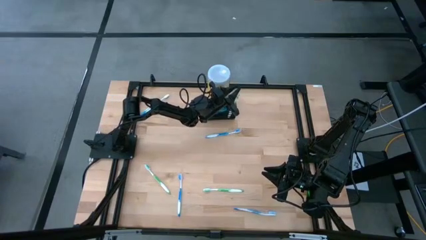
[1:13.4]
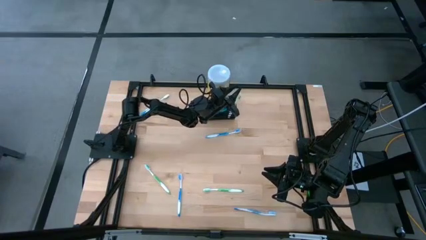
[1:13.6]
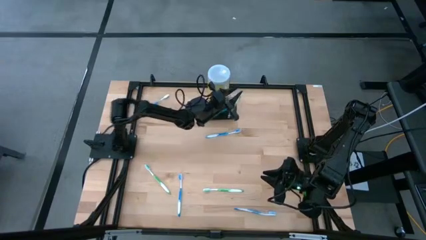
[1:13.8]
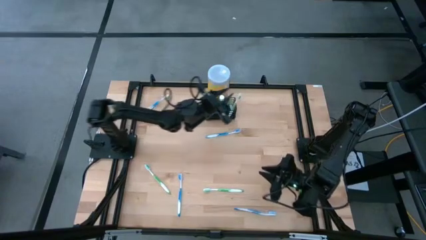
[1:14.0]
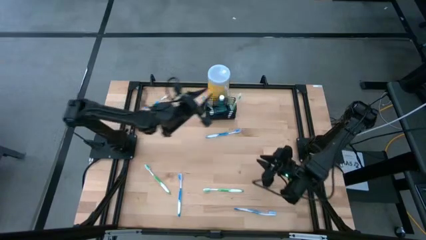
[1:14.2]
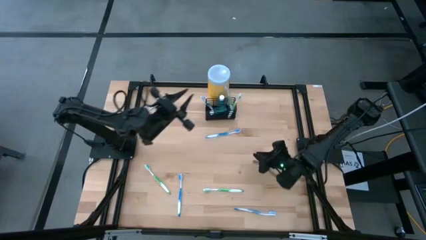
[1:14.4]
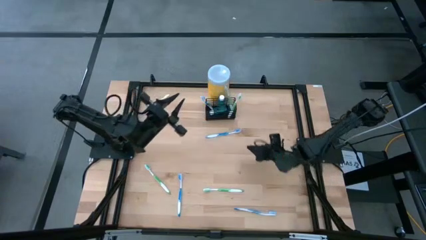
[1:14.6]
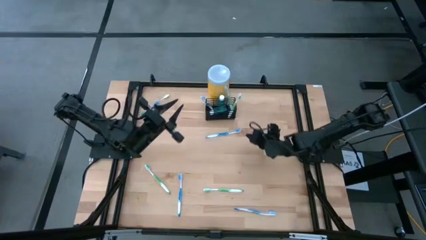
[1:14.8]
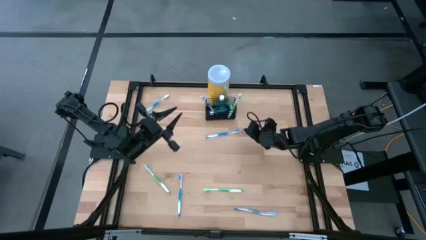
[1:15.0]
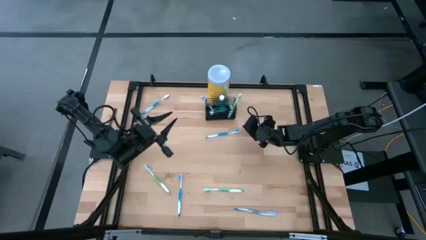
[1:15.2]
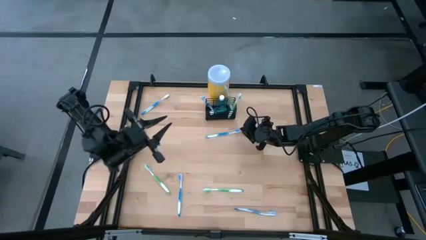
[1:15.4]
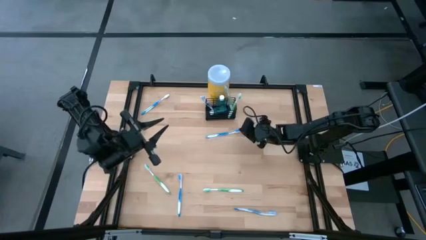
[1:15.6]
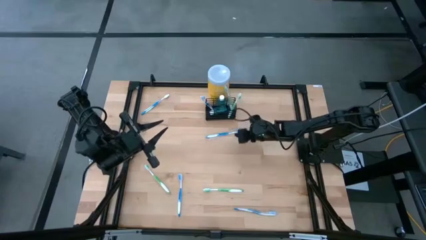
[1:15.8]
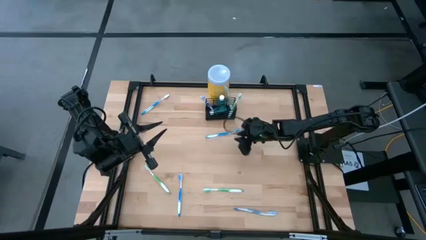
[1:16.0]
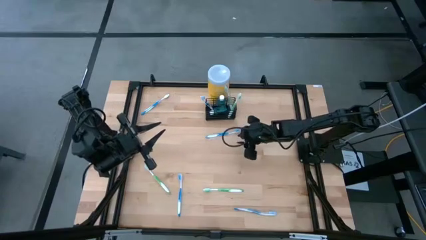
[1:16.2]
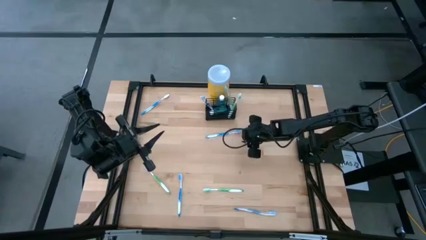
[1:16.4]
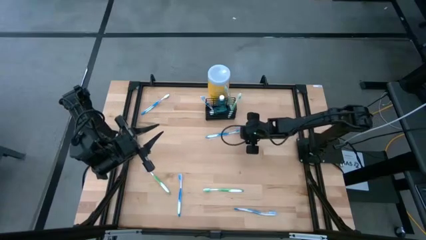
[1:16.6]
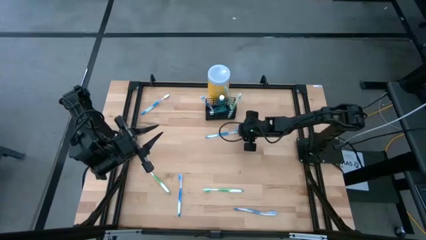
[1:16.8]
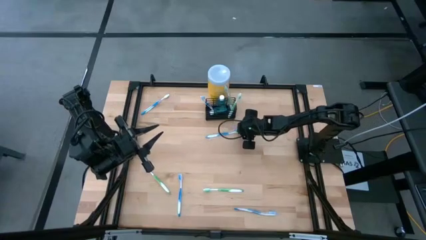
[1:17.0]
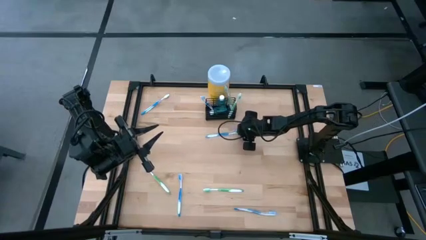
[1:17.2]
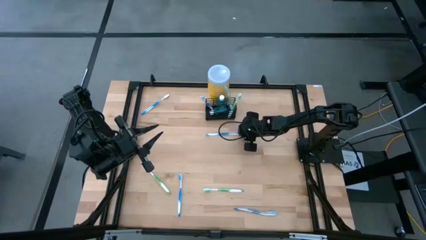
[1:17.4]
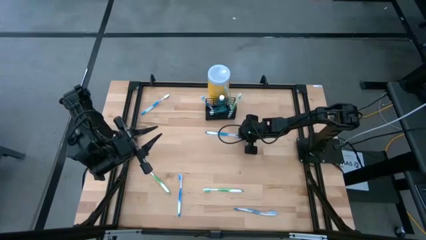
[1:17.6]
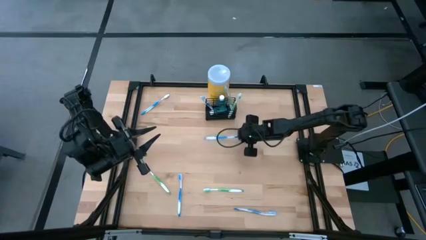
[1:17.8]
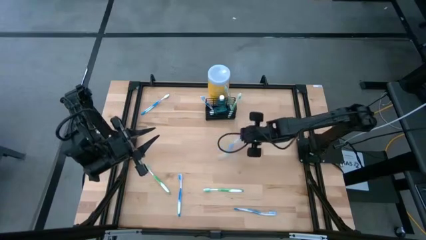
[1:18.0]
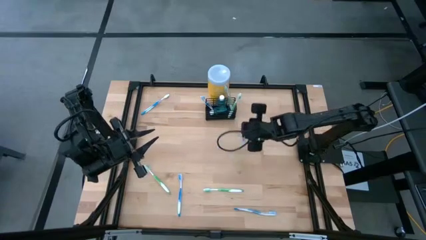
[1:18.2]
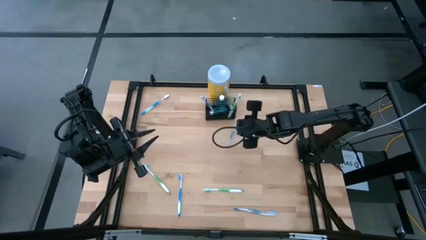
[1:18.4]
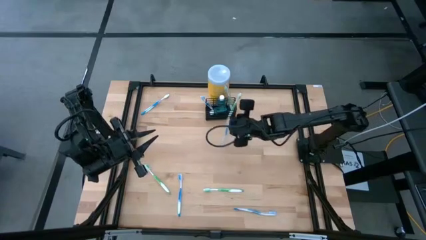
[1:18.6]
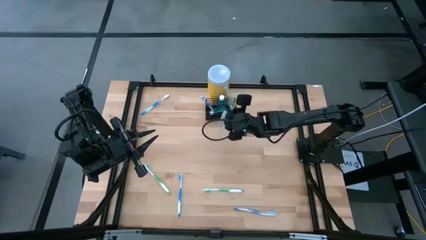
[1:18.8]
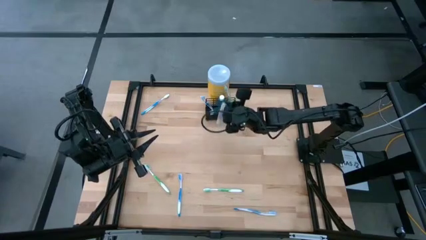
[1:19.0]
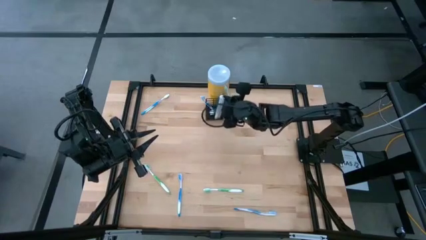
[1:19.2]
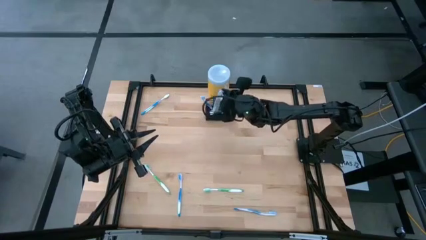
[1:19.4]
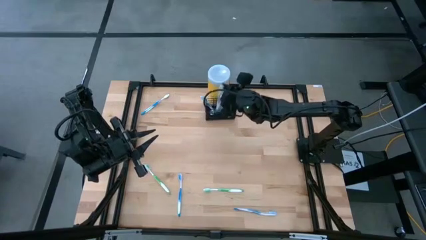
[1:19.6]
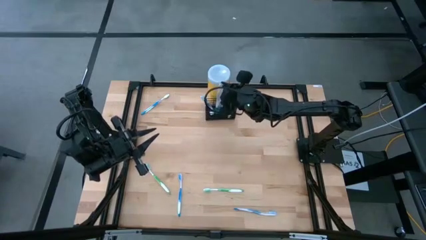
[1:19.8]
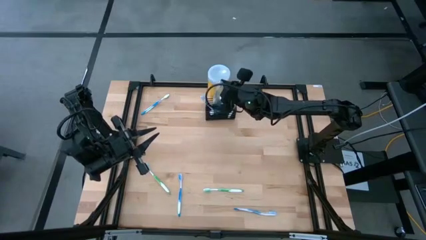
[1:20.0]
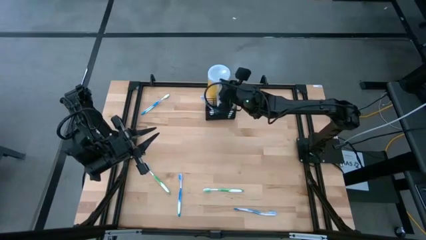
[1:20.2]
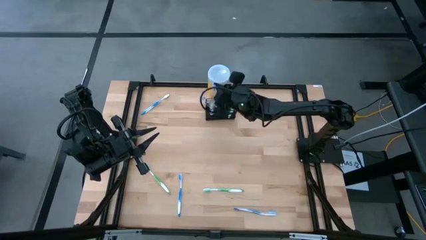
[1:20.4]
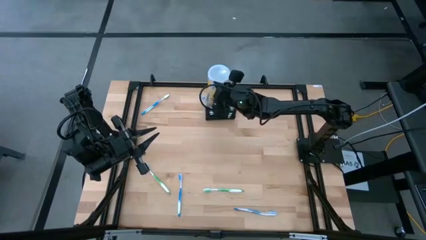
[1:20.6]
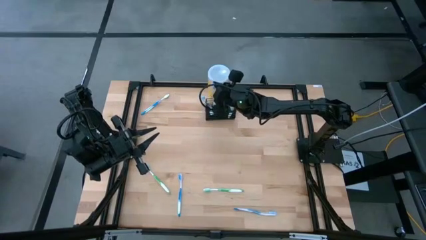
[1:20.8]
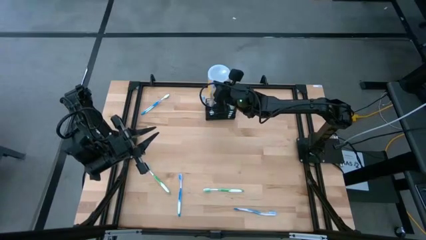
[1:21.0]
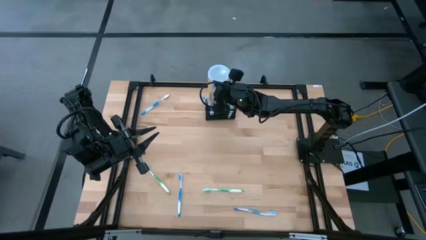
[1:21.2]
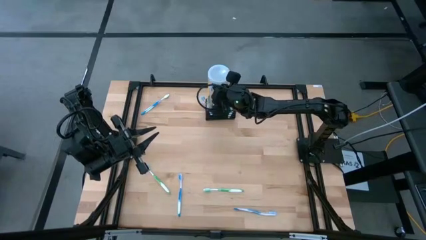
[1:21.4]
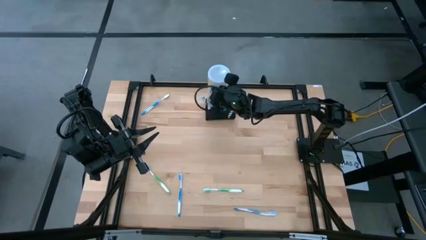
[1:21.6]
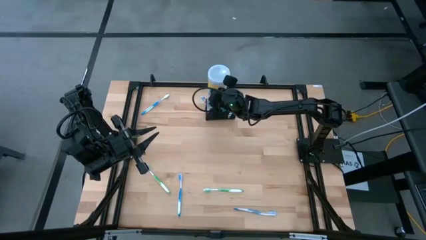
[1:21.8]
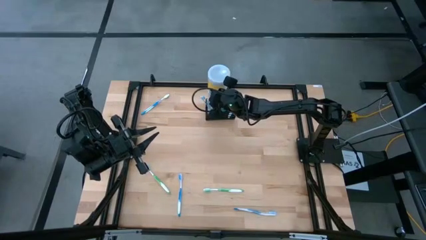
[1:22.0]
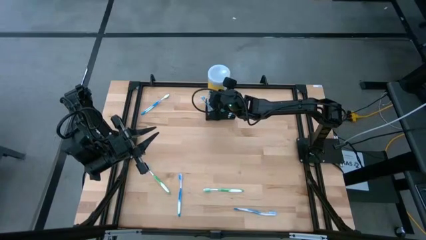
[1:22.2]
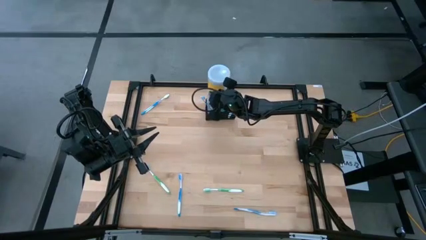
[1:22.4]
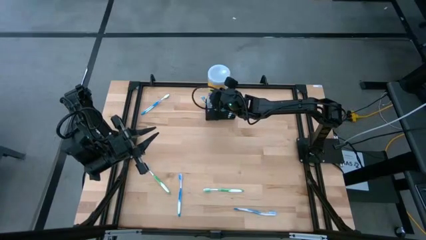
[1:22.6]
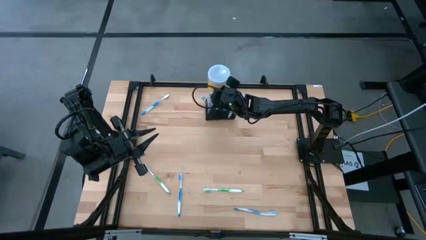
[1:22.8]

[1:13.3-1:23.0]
Task: Pick & Place toothbrushing station
Put the blue toothbrush in the wire organizer

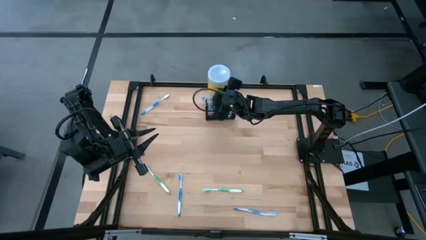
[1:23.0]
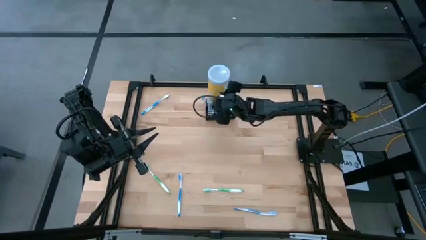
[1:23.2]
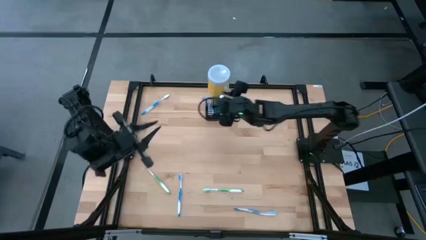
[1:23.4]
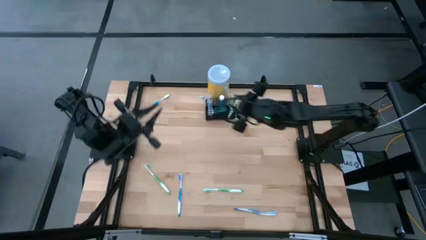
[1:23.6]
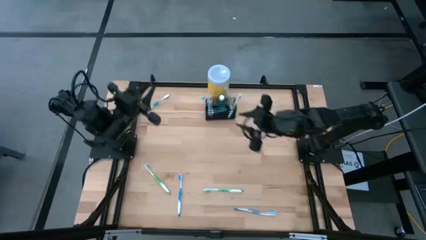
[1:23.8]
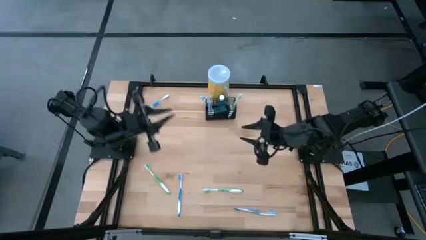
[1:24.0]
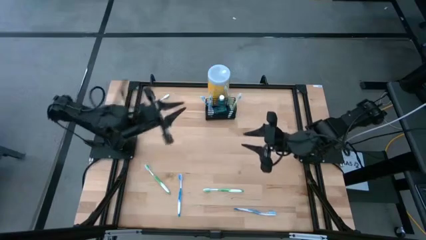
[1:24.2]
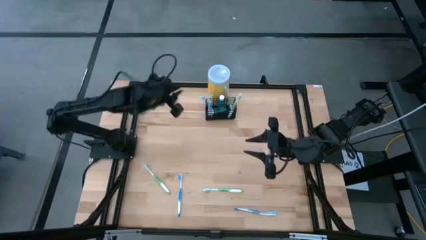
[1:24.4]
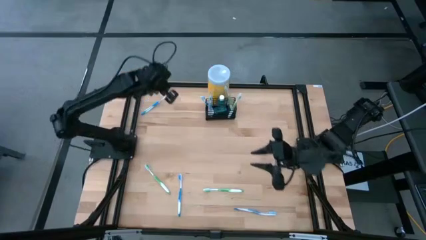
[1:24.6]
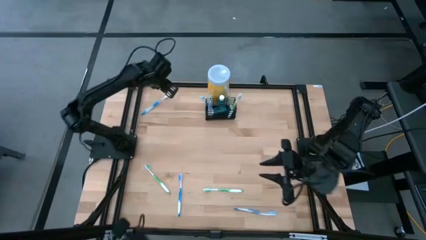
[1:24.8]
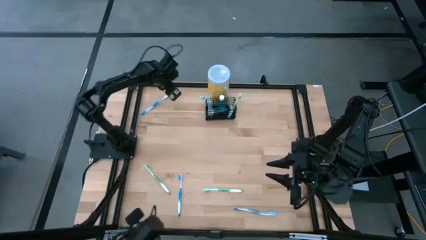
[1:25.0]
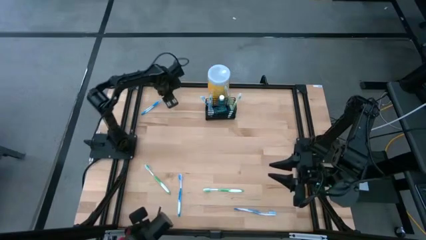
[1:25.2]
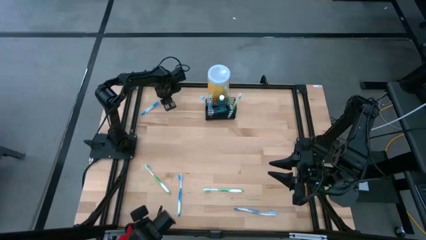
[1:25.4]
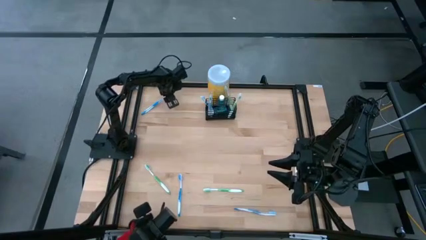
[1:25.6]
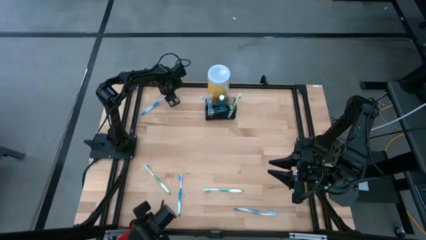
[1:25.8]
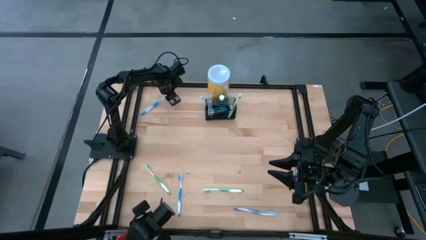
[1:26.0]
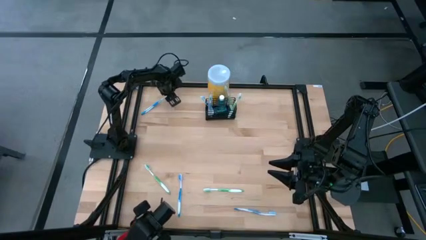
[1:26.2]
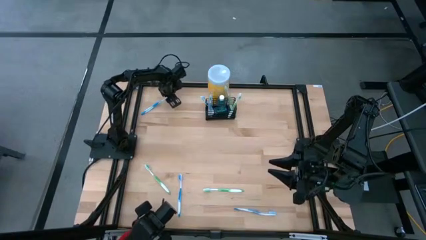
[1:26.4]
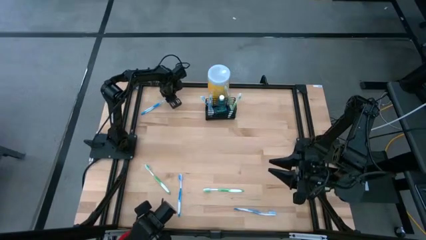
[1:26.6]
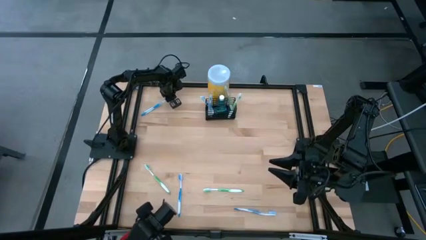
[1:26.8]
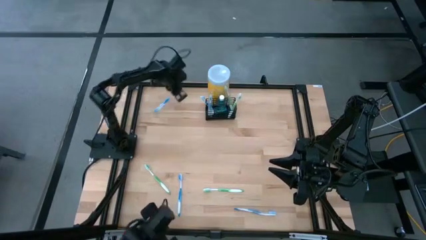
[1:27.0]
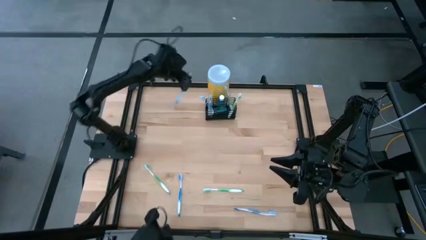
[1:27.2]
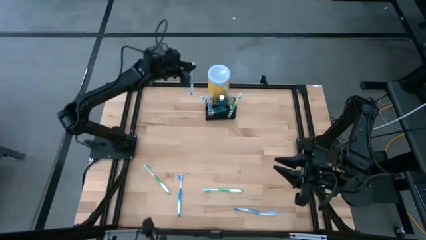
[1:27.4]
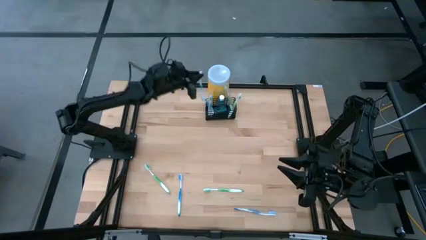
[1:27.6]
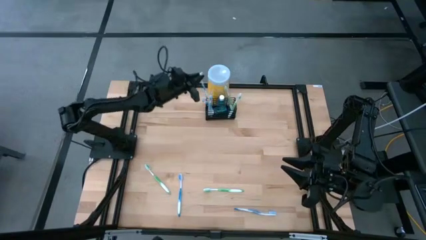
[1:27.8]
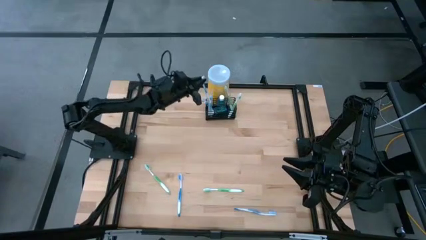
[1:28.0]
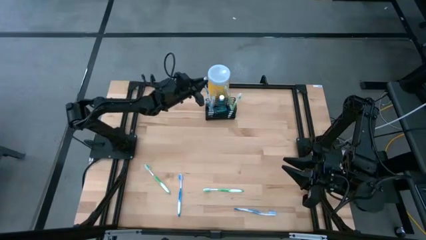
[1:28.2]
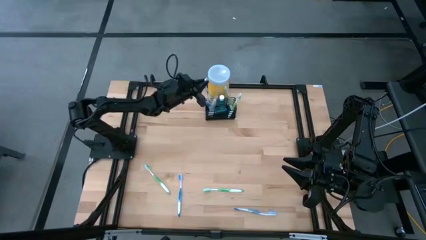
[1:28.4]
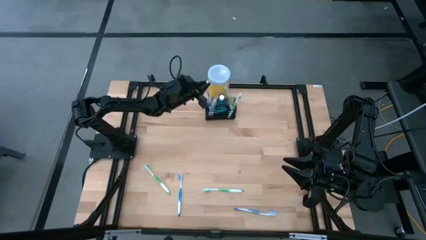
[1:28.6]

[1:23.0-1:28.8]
Put the blue toothbrush in the wire organizer
